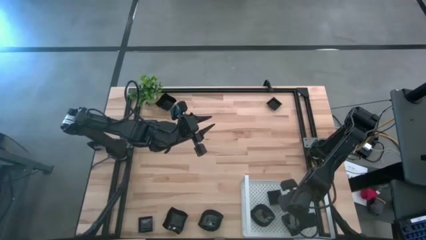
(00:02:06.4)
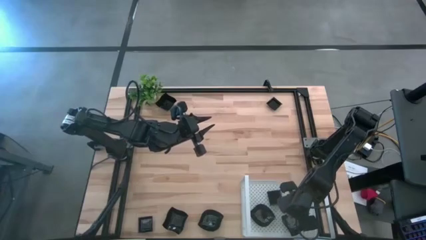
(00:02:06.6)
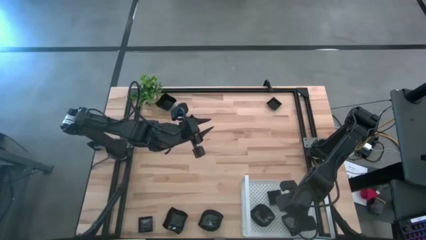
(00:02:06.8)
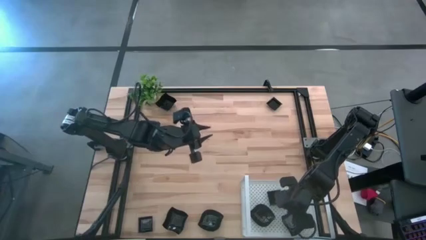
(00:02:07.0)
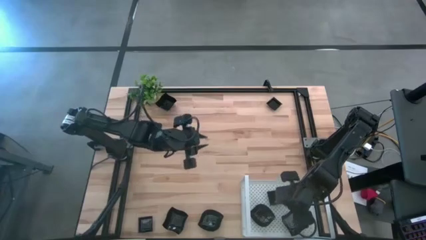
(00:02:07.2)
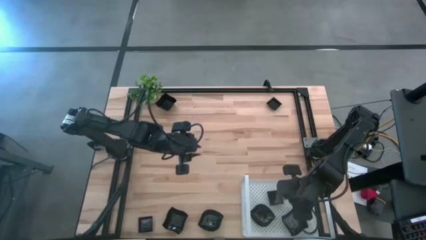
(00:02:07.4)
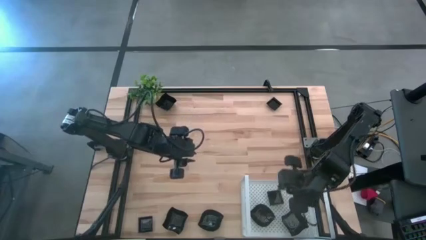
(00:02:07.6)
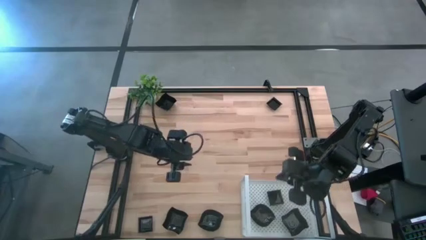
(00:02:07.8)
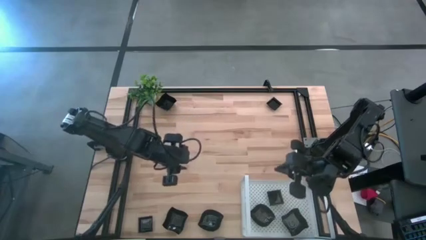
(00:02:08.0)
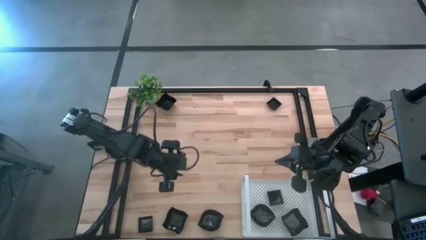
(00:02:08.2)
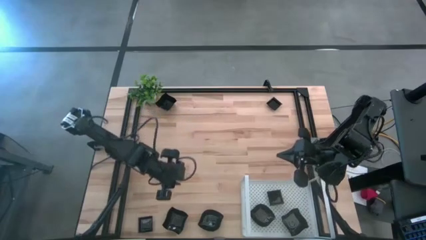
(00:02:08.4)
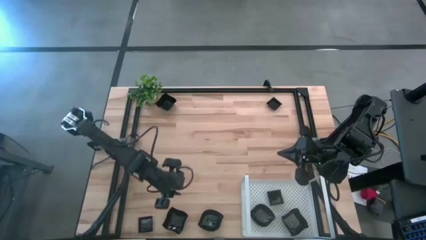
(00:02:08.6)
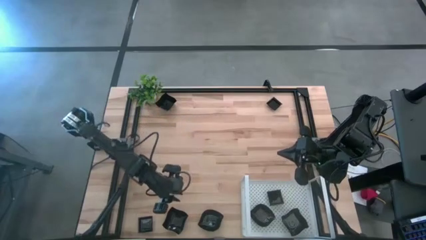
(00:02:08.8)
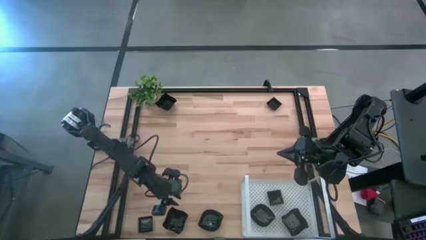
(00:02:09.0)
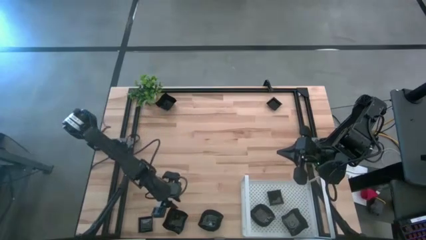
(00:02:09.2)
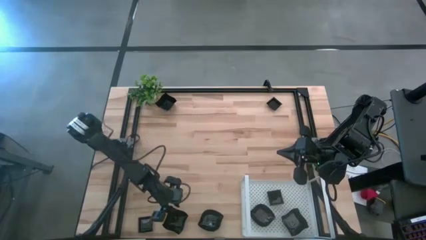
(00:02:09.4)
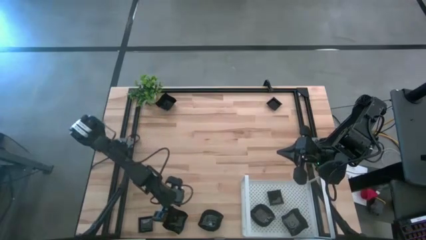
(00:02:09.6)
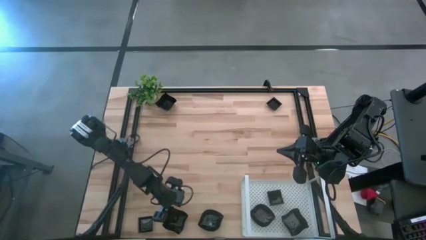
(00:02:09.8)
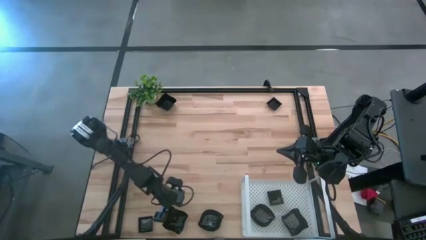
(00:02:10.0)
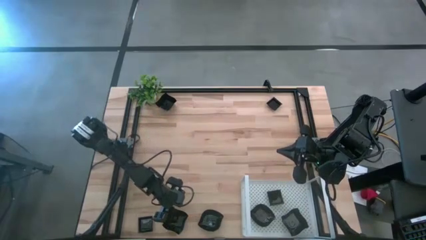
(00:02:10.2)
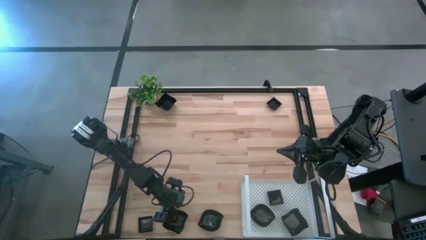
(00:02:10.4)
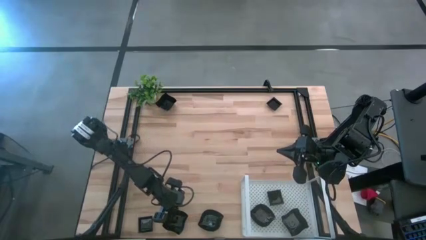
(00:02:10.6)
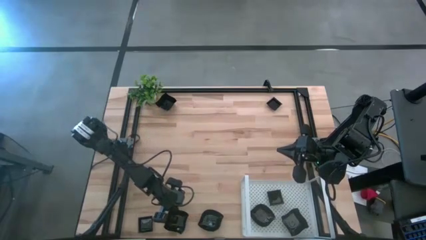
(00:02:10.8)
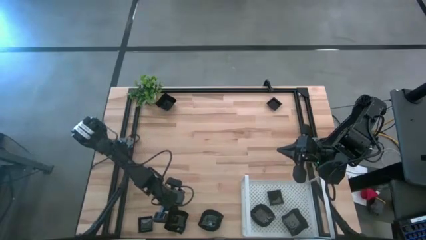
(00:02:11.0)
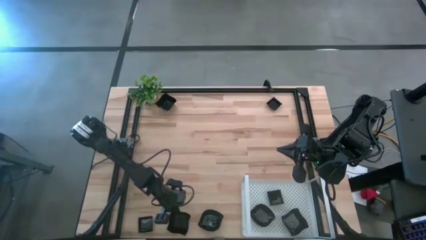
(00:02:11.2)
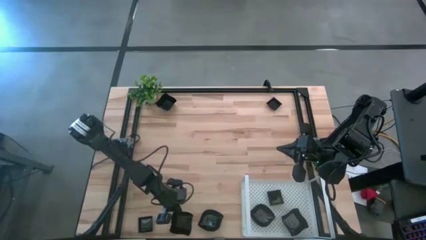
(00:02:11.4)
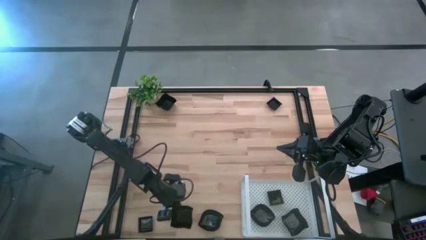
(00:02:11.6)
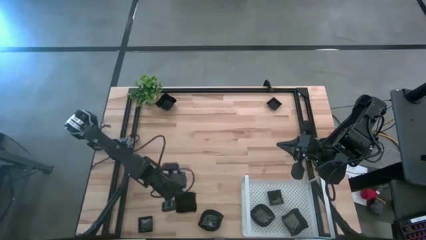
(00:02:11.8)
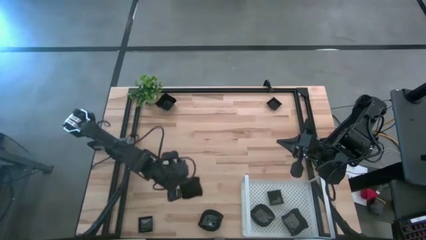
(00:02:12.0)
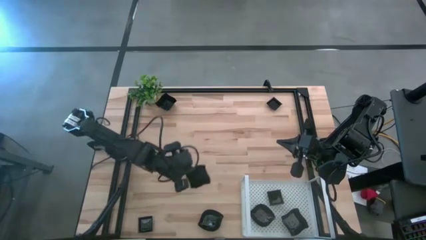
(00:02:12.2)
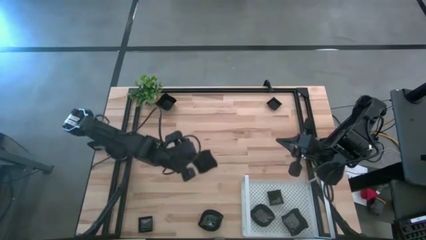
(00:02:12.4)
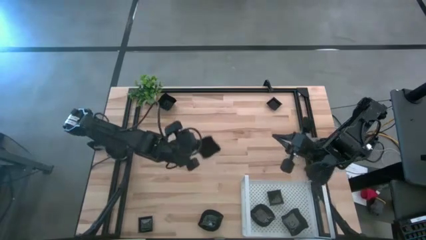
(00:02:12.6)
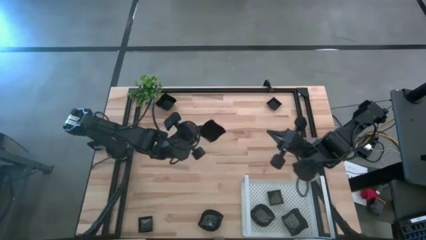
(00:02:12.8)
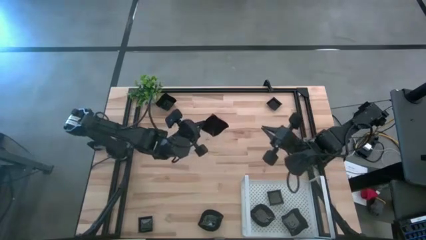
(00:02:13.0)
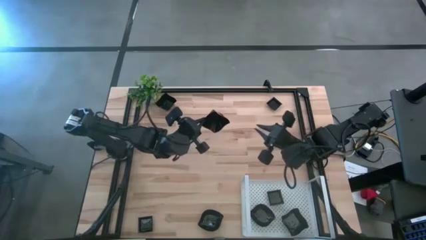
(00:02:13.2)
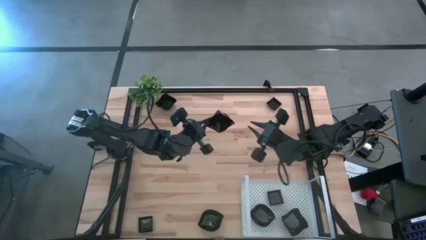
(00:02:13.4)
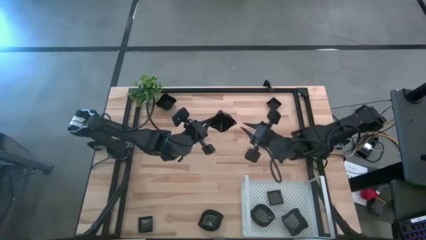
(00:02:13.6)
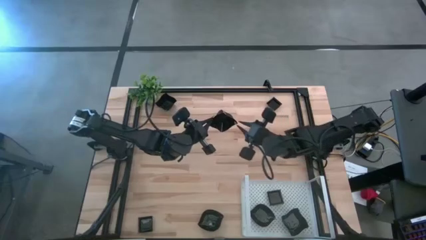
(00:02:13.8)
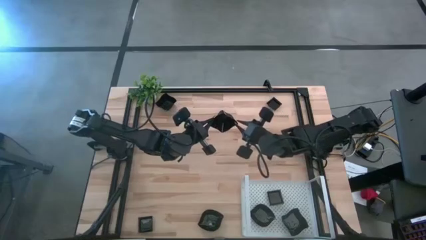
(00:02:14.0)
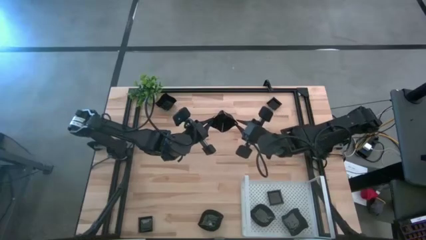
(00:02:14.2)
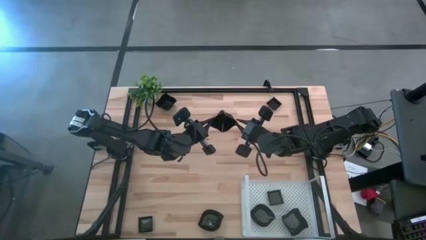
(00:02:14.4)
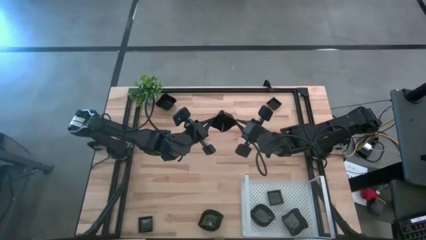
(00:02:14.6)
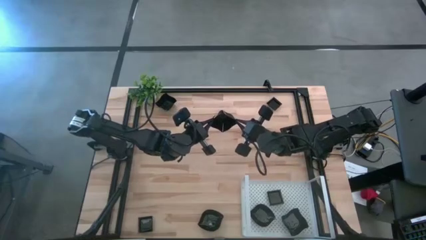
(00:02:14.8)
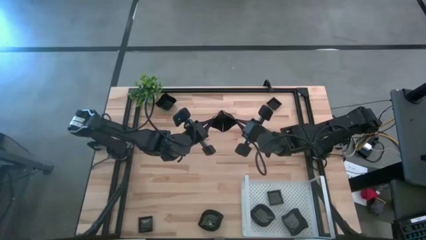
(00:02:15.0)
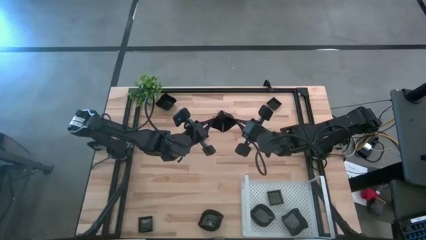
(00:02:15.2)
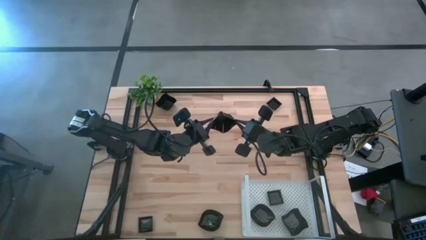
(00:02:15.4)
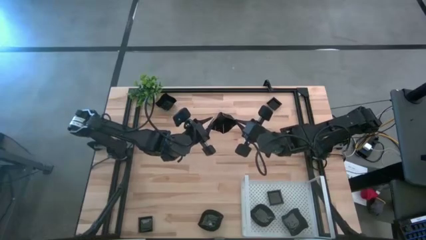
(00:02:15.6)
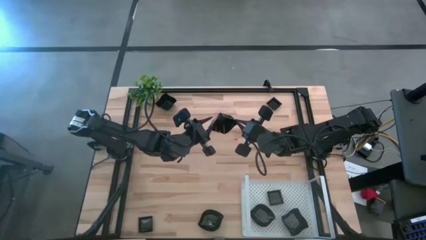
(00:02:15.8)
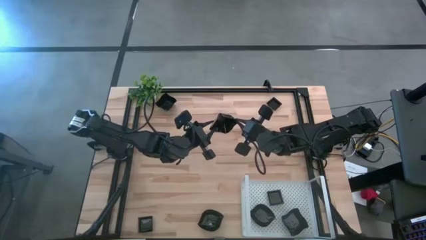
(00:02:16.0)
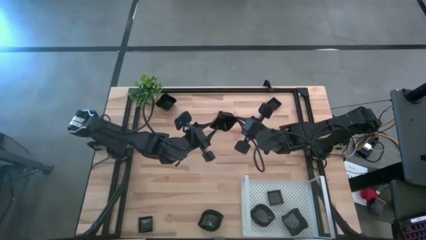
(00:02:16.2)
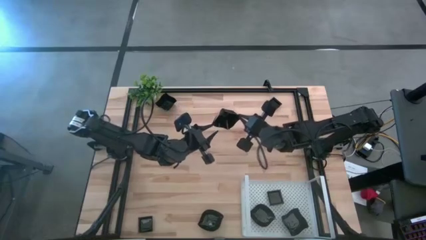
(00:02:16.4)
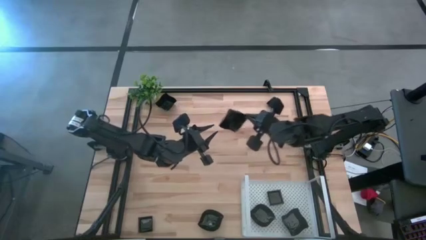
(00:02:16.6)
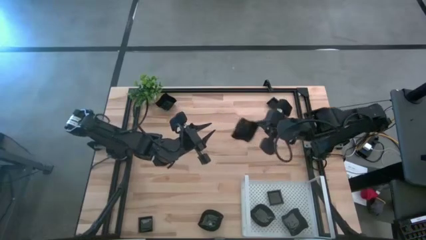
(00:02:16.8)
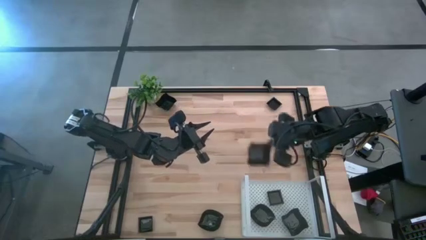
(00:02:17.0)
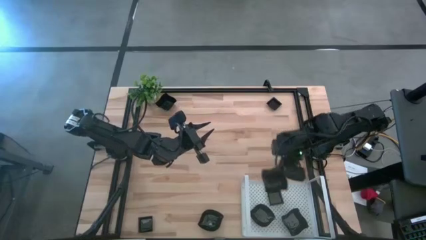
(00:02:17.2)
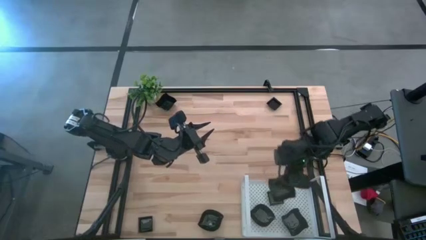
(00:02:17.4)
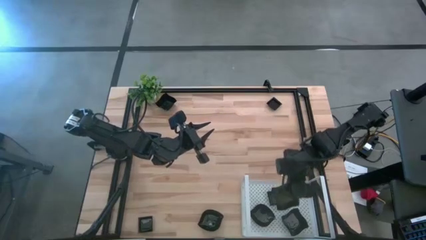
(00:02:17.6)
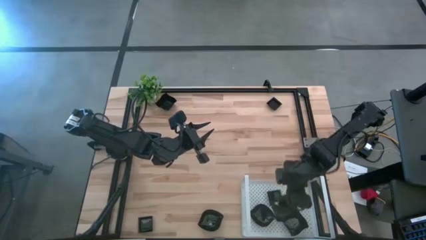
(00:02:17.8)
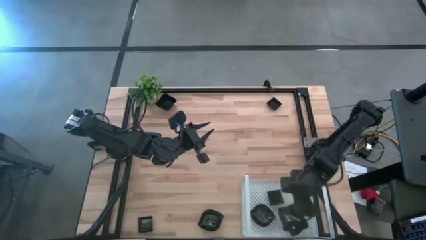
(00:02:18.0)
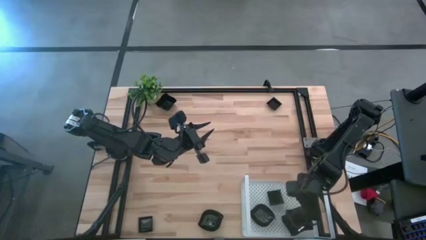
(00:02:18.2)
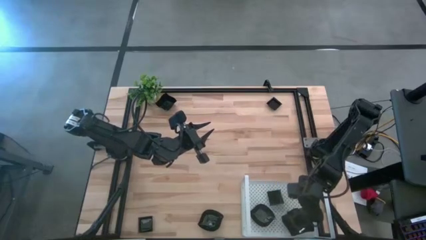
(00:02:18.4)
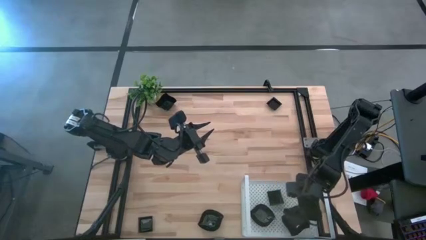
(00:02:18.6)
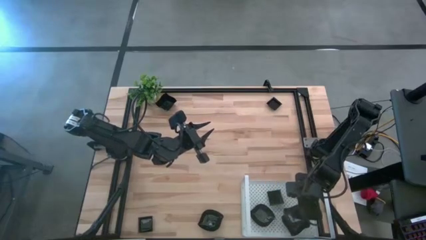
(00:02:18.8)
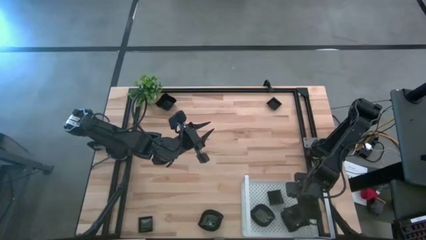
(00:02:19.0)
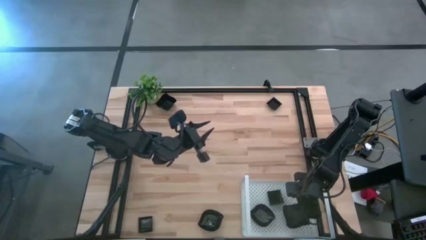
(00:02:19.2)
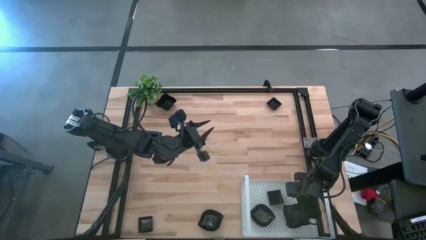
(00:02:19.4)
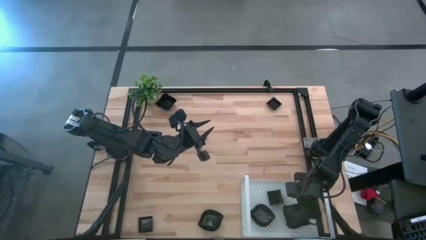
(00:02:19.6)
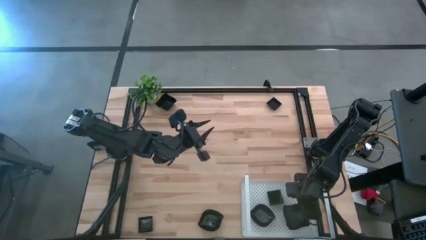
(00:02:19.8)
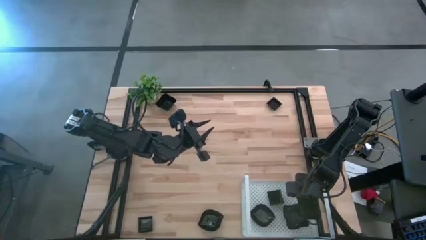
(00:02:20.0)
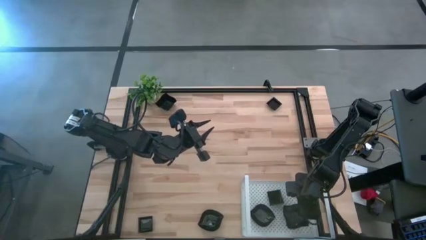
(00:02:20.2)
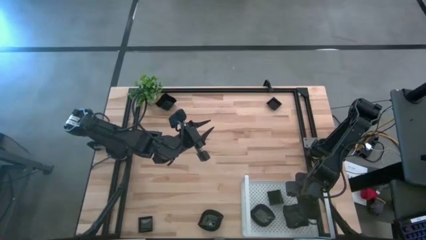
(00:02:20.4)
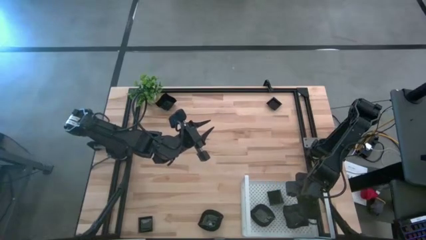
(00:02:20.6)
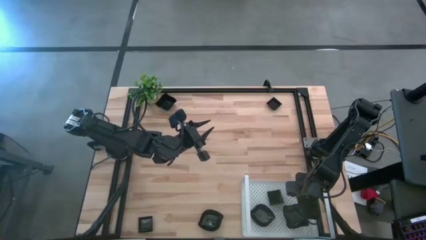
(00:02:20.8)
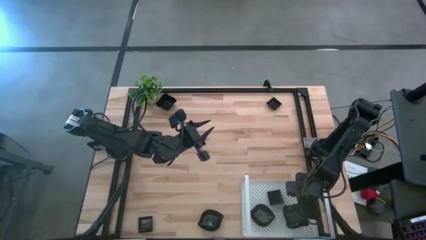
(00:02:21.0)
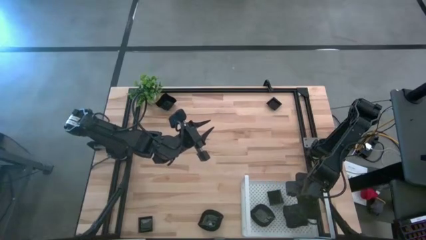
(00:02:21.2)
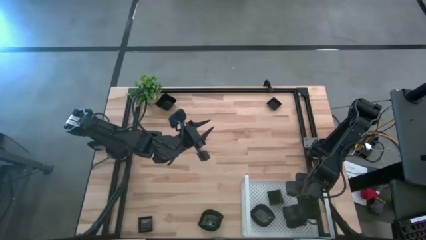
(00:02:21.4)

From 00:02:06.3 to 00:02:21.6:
Task: Pick & Place Mini shaped plates
Stack the distorted square plate on top of the other distorted square plate on the shelf
